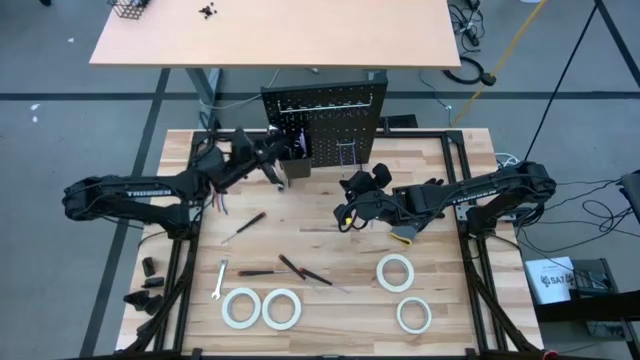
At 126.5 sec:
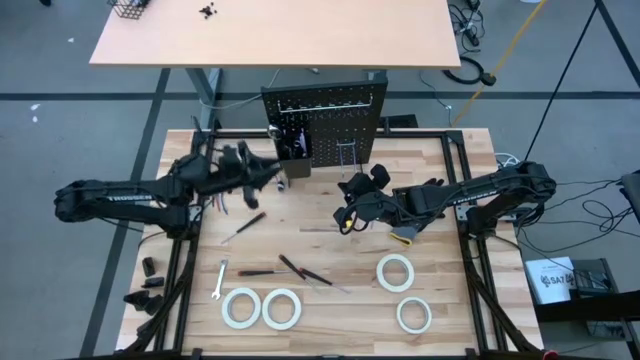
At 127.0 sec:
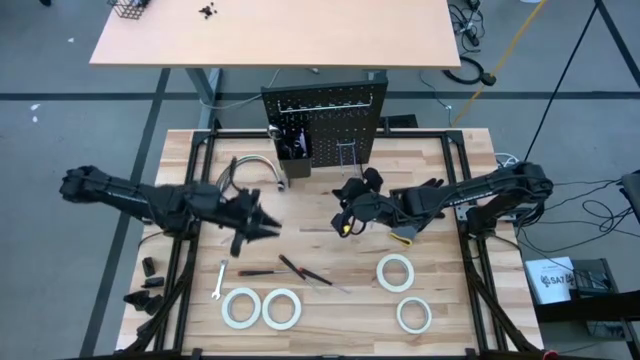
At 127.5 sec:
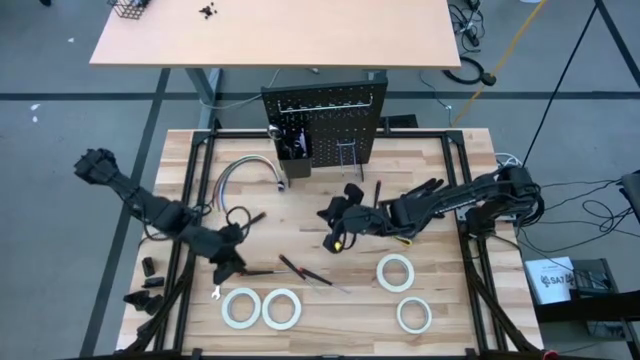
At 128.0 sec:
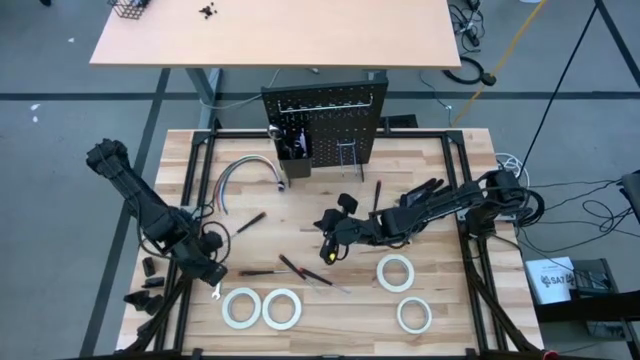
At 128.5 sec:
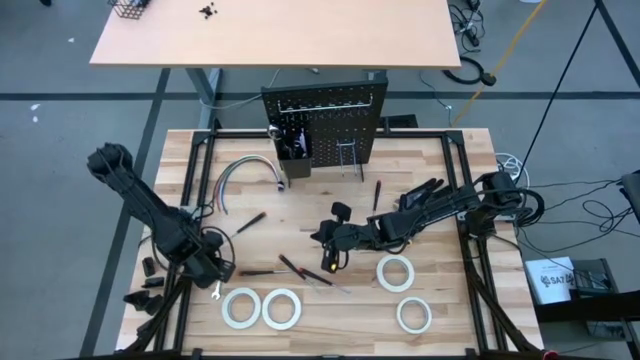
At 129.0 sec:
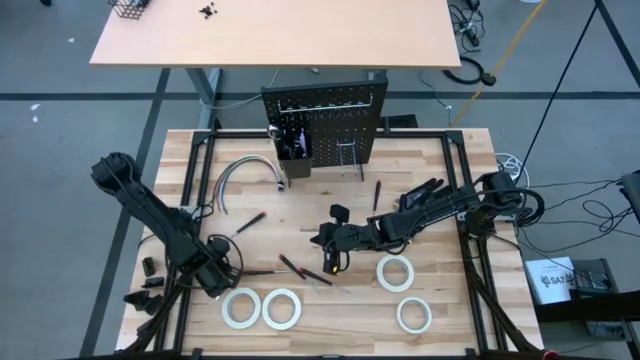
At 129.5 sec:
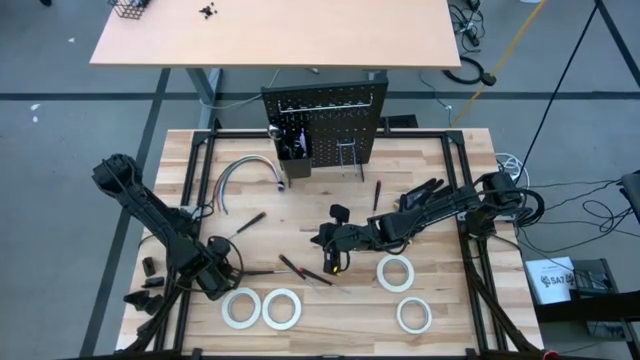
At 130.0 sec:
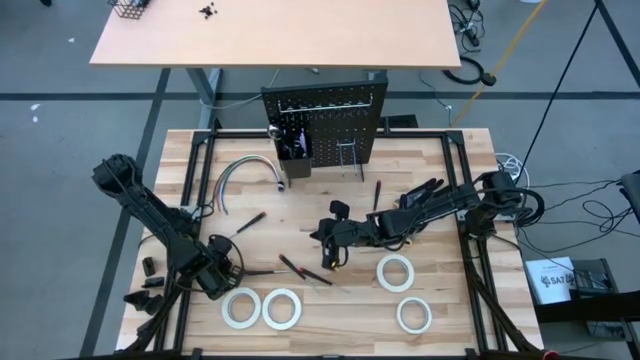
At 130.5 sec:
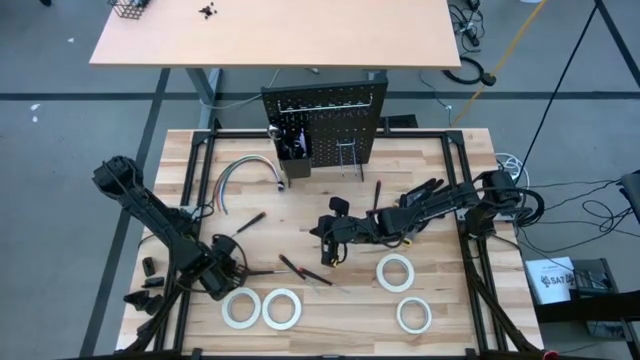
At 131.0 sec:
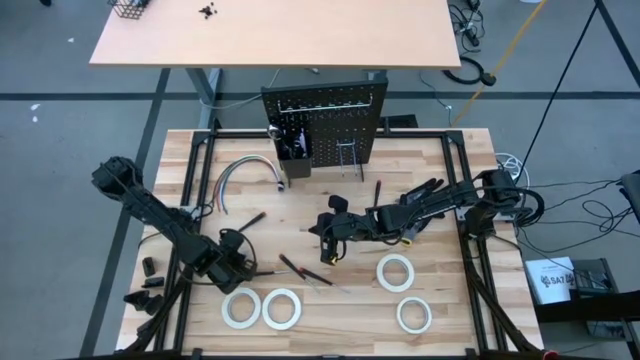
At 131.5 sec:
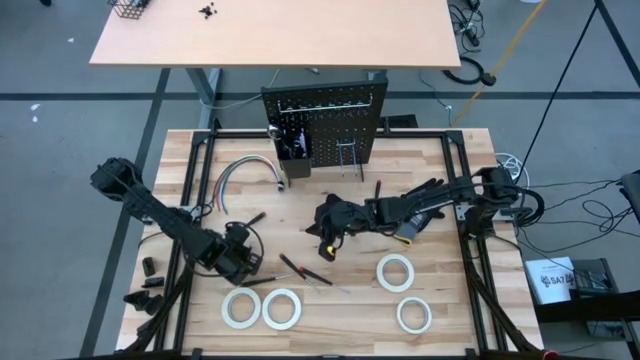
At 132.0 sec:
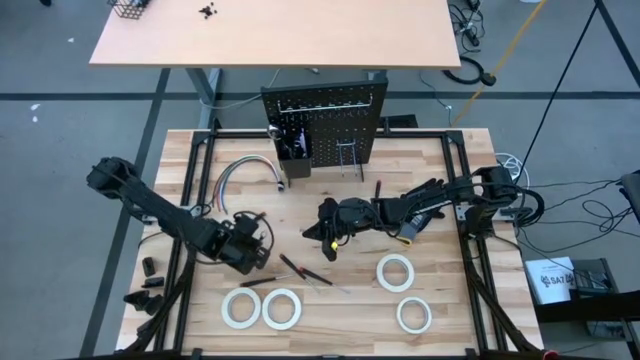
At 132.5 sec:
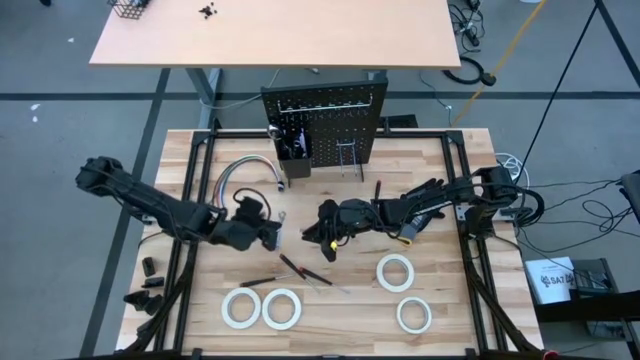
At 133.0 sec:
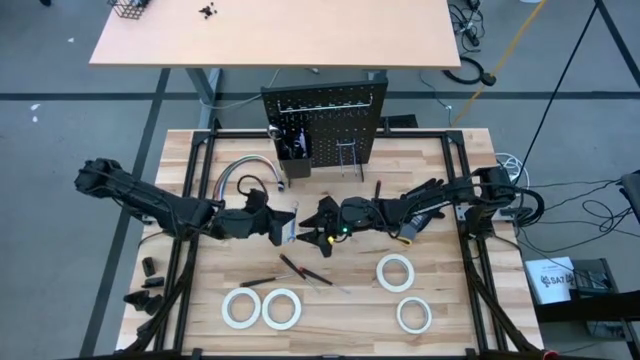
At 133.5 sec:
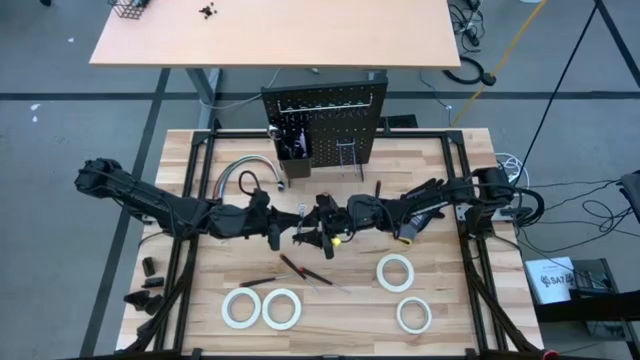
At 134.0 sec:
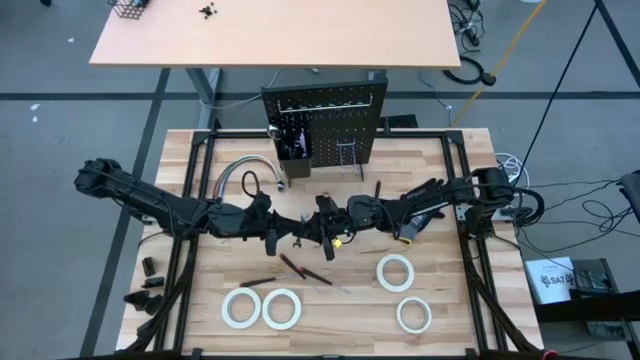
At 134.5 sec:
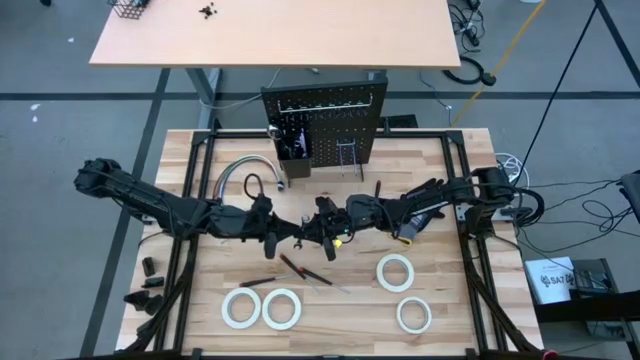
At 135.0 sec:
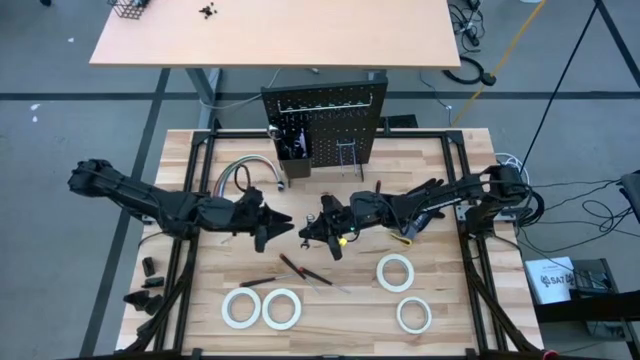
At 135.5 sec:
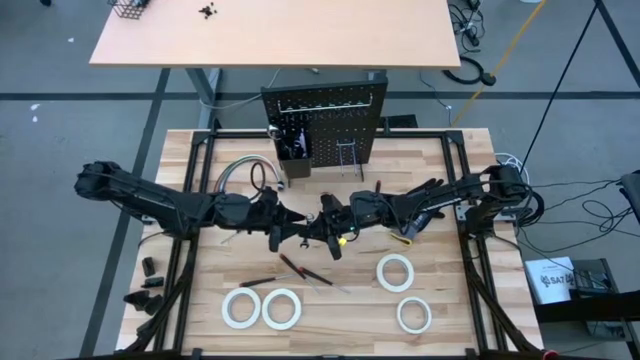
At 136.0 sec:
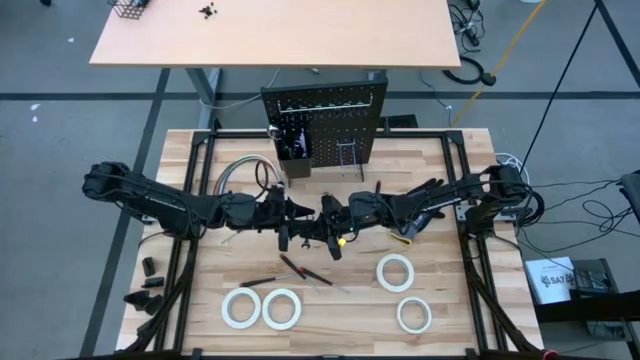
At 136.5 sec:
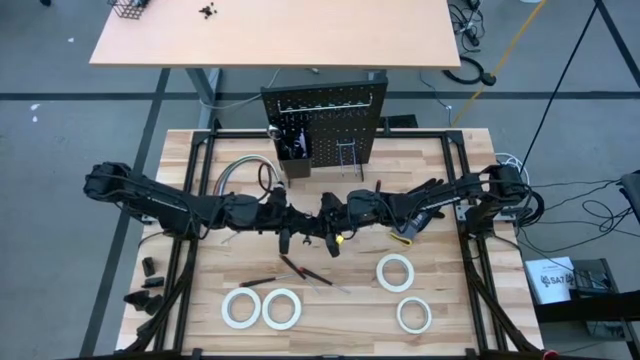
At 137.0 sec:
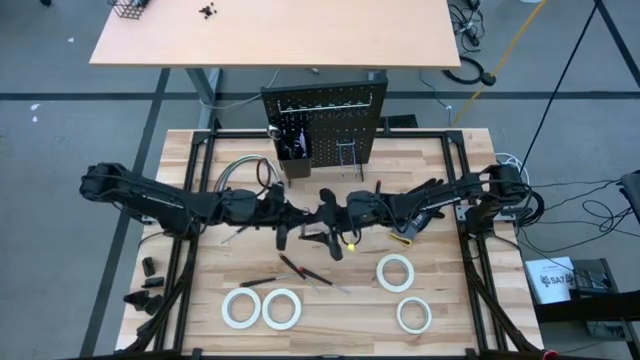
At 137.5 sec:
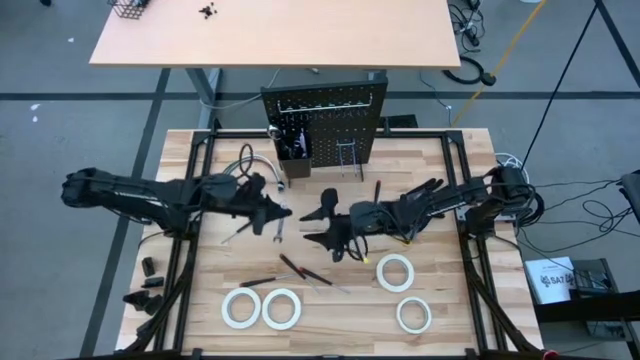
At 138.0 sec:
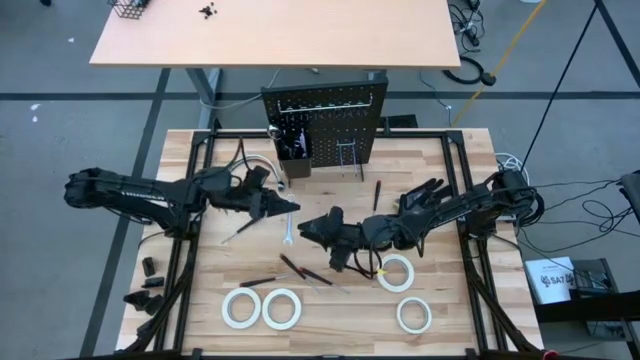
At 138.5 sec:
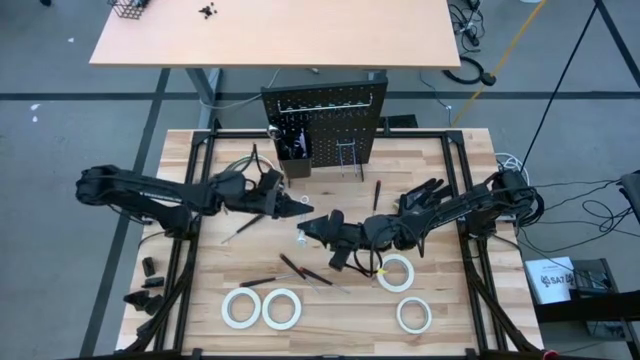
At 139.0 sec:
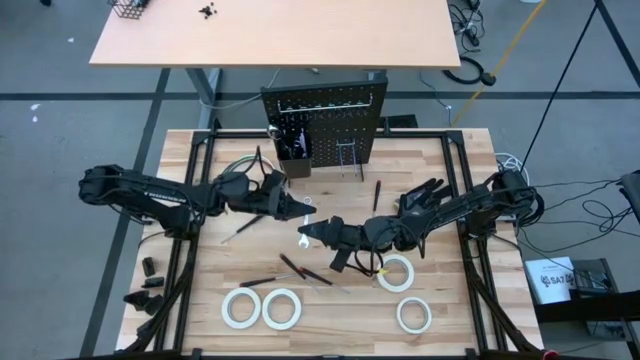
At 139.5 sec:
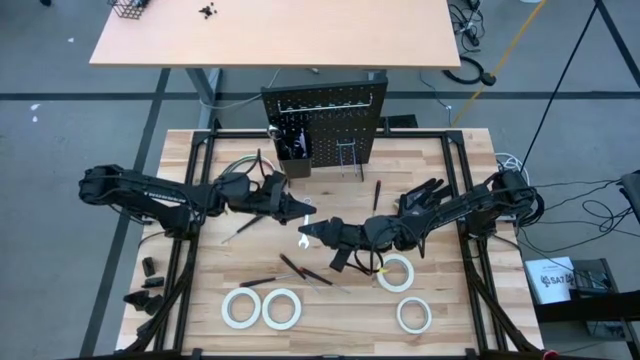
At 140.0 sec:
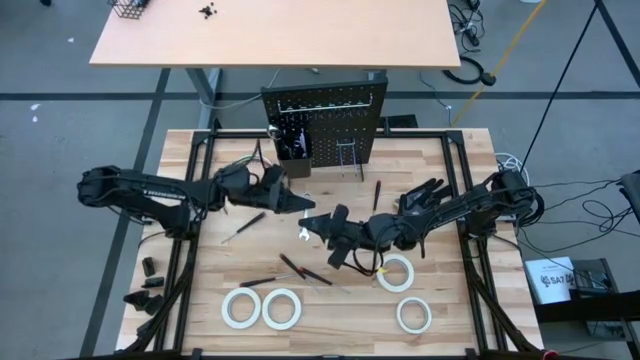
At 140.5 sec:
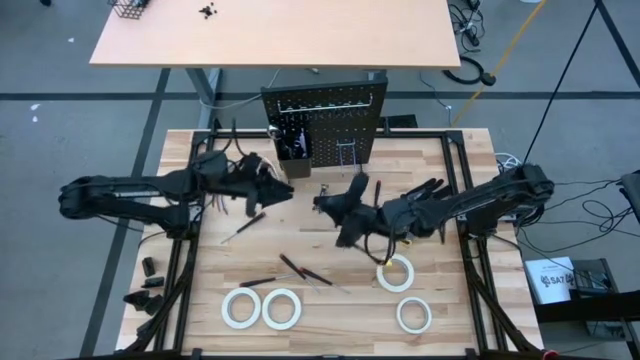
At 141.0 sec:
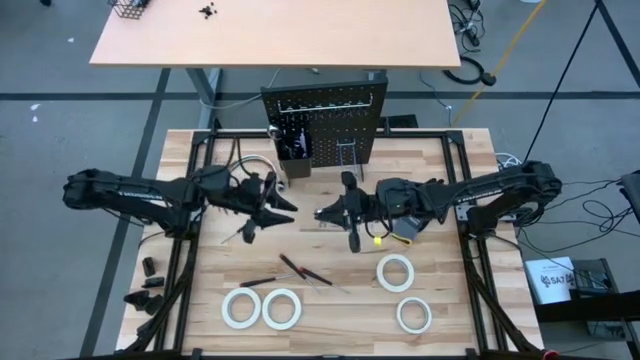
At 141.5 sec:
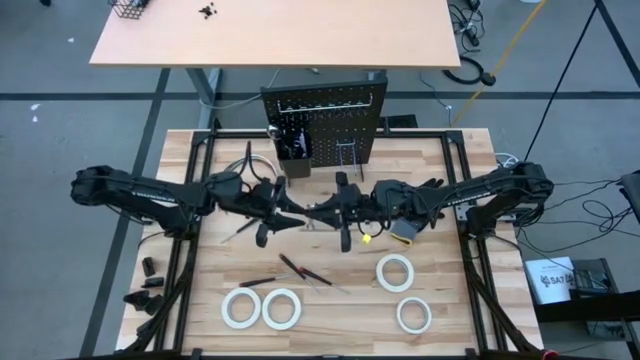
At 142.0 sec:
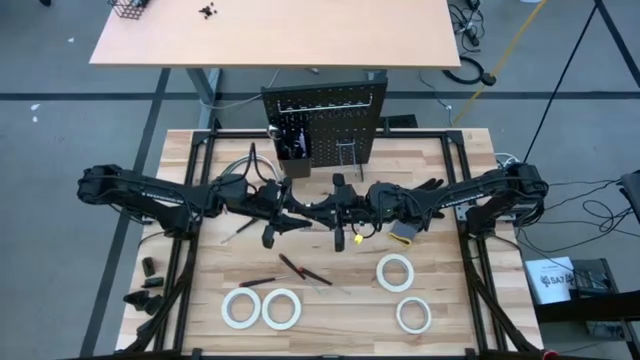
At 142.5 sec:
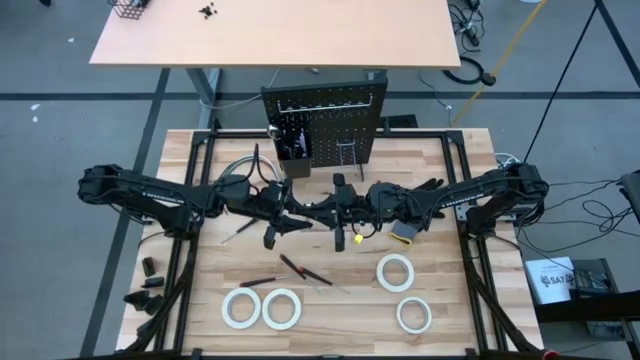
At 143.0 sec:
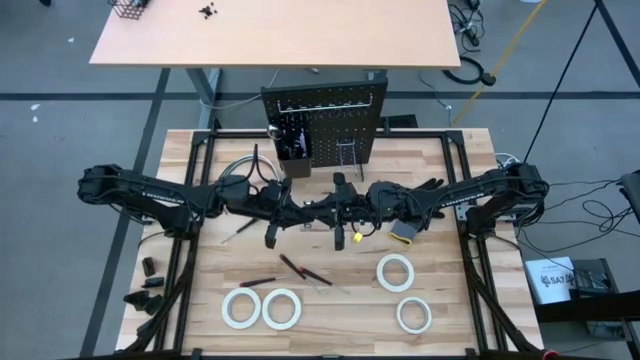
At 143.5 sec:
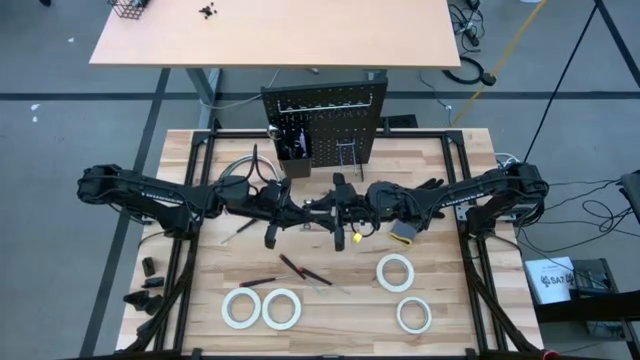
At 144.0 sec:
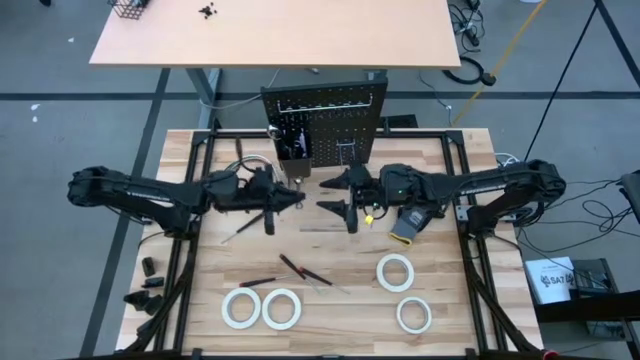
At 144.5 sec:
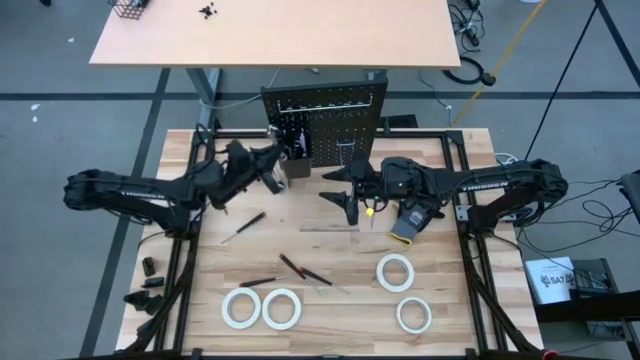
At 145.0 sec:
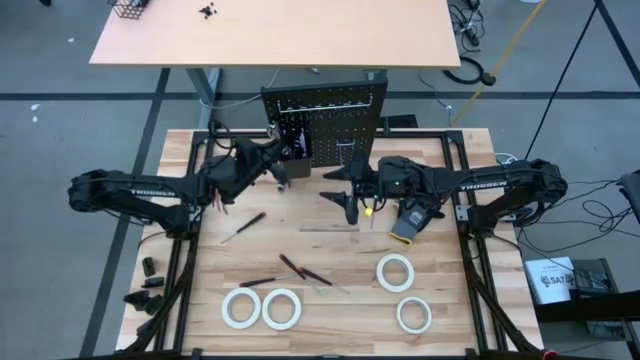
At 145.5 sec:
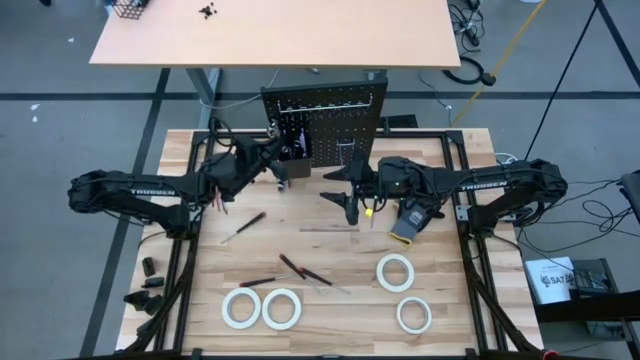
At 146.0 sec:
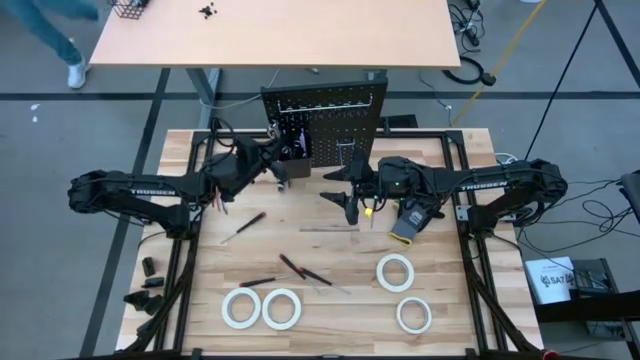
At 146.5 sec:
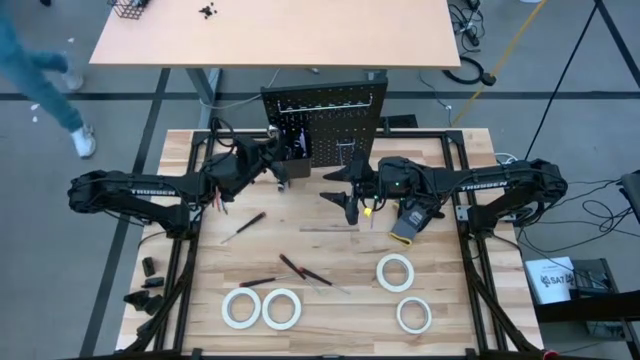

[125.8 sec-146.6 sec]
Task: Hang tools onto peg board
Put the wrench into the peg board

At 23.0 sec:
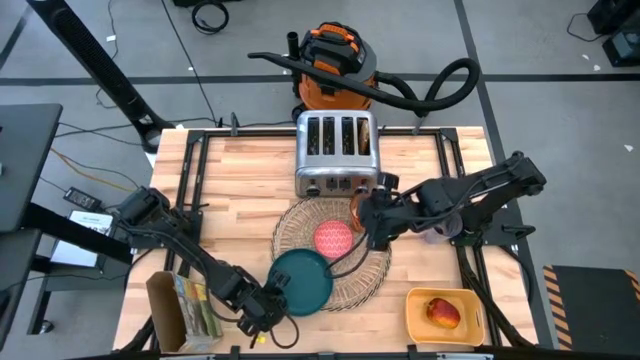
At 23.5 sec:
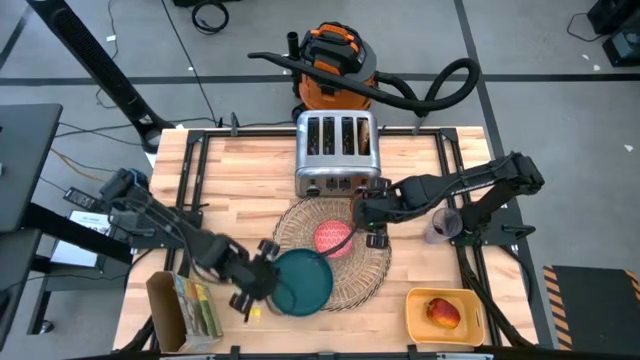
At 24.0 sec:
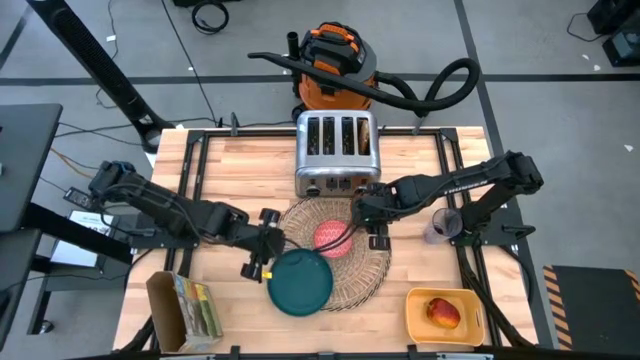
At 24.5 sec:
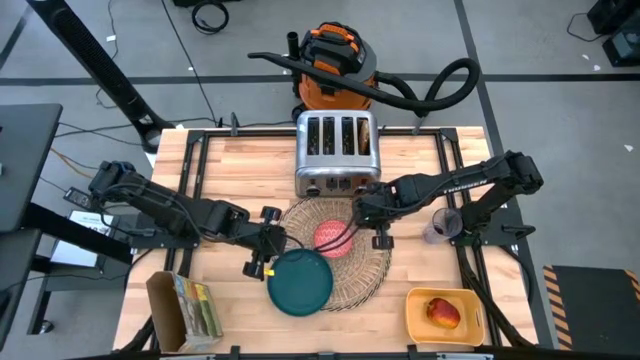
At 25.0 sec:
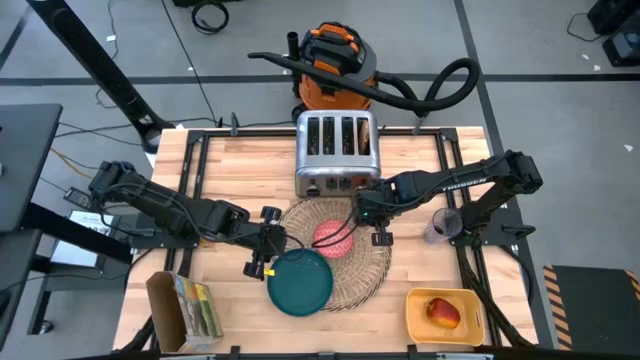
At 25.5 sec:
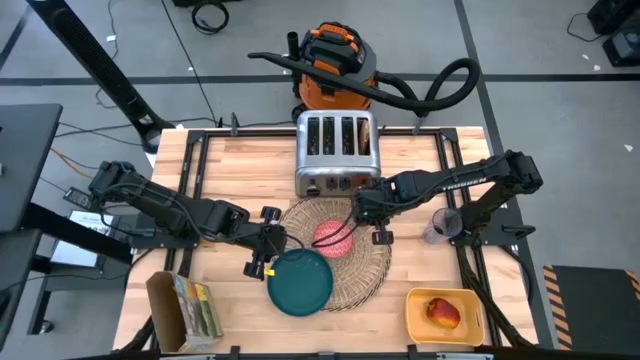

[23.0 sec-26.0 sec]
Task: Arrange a breakfast setting
Adjust the orange glass of milk on the brown placemat
